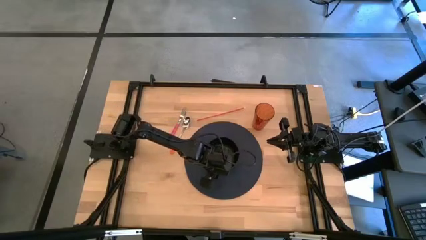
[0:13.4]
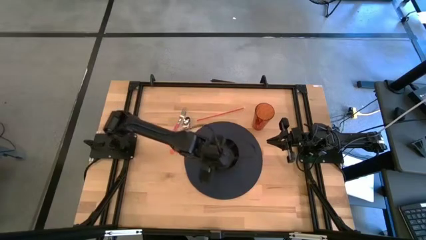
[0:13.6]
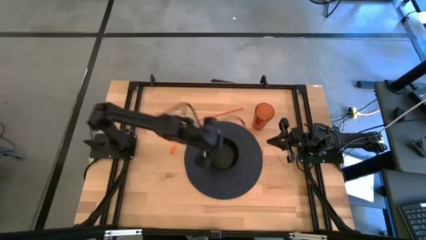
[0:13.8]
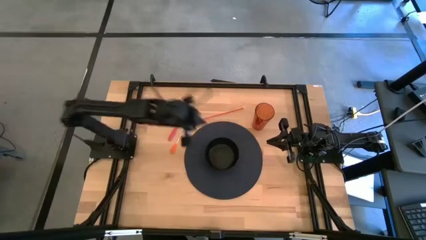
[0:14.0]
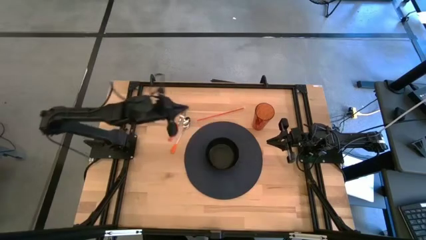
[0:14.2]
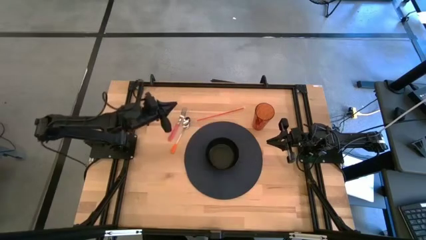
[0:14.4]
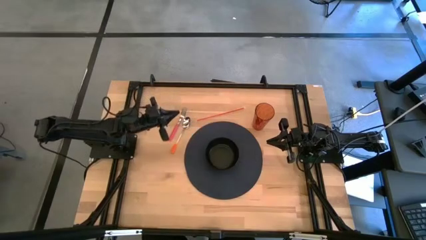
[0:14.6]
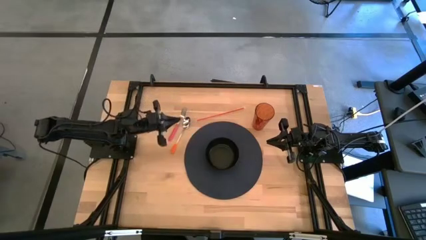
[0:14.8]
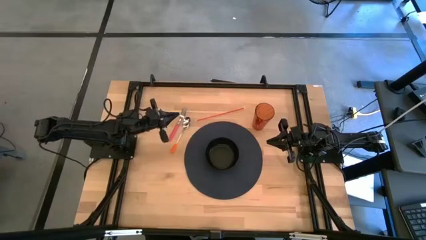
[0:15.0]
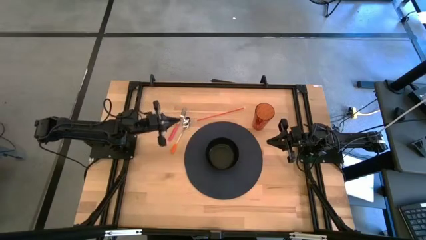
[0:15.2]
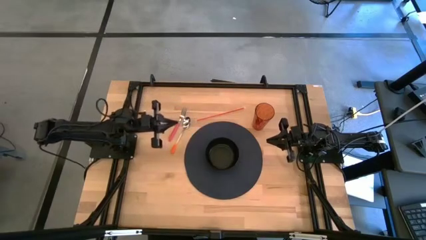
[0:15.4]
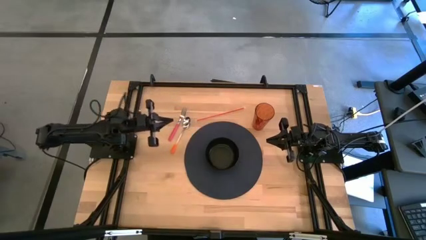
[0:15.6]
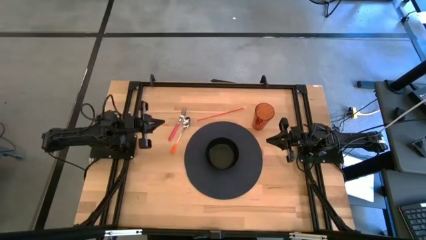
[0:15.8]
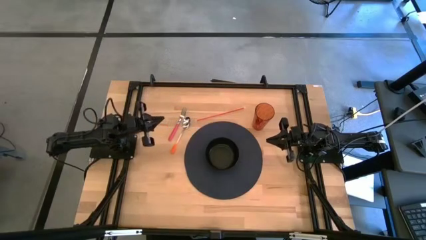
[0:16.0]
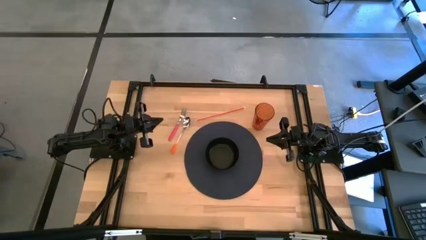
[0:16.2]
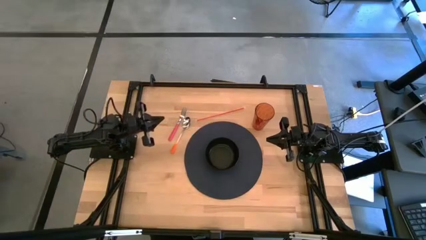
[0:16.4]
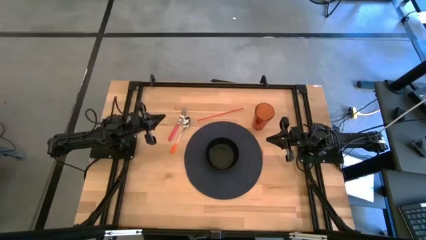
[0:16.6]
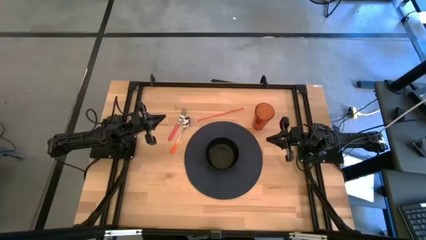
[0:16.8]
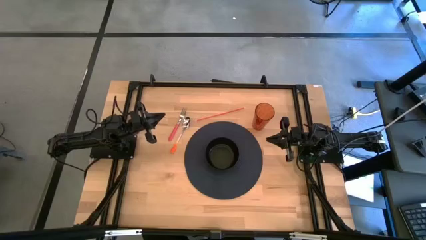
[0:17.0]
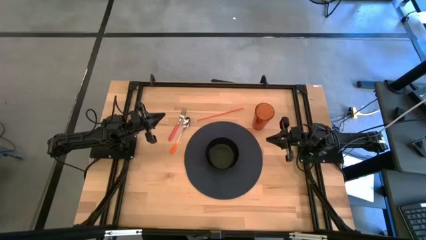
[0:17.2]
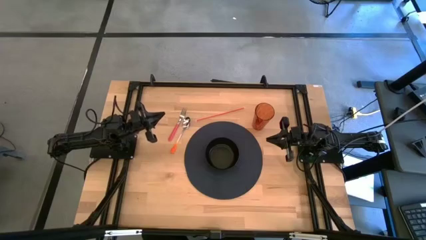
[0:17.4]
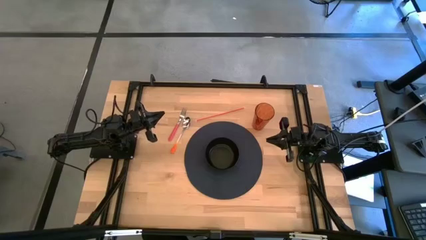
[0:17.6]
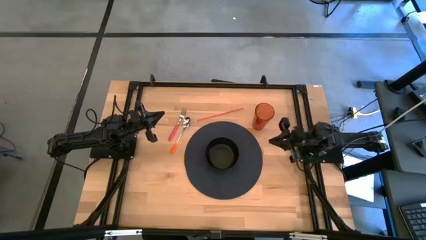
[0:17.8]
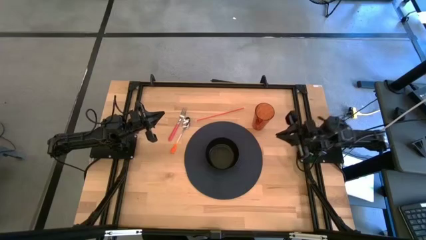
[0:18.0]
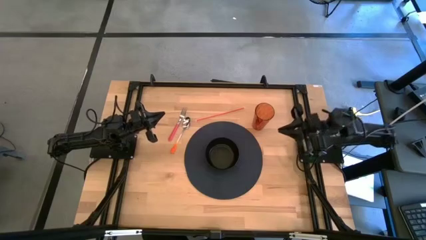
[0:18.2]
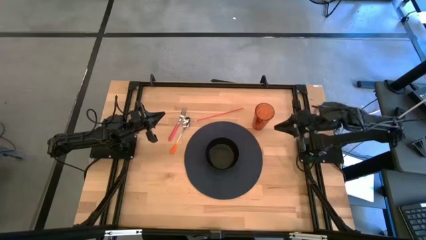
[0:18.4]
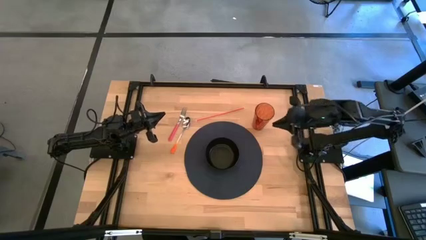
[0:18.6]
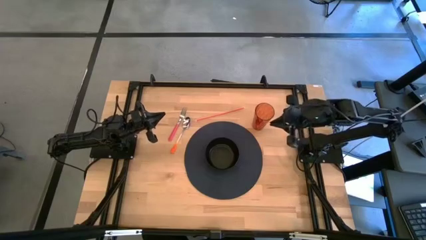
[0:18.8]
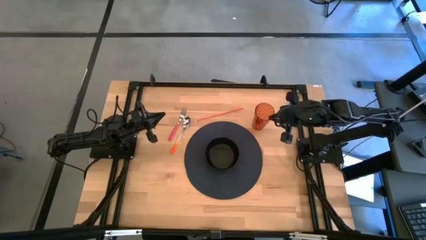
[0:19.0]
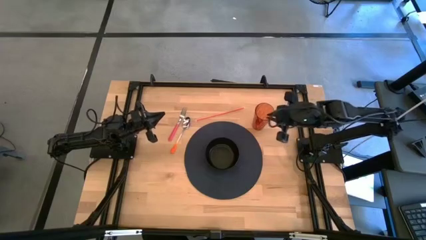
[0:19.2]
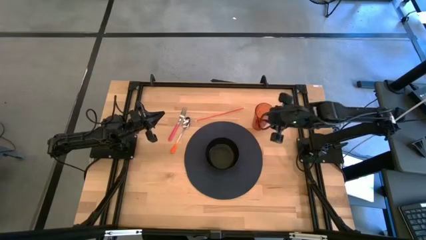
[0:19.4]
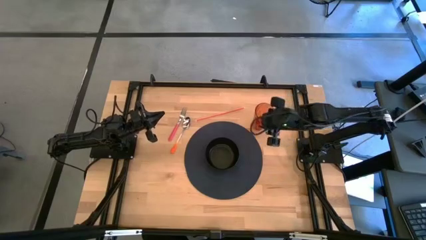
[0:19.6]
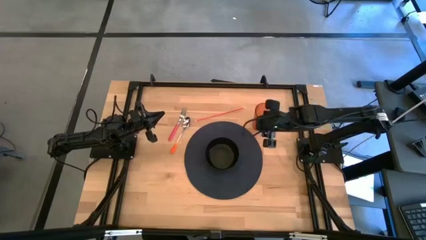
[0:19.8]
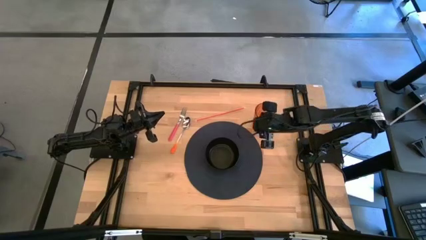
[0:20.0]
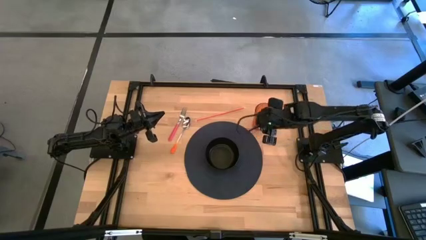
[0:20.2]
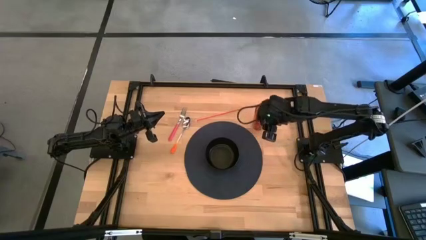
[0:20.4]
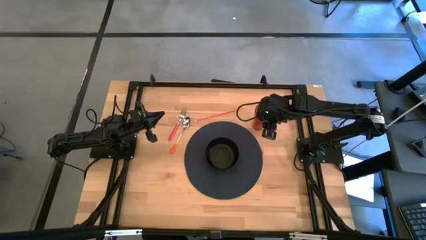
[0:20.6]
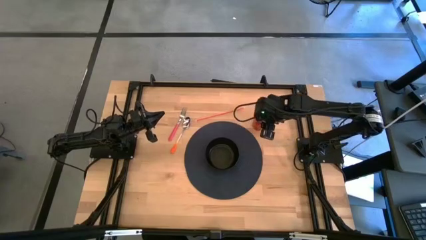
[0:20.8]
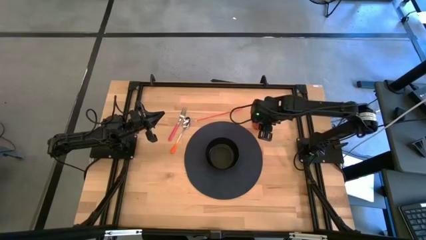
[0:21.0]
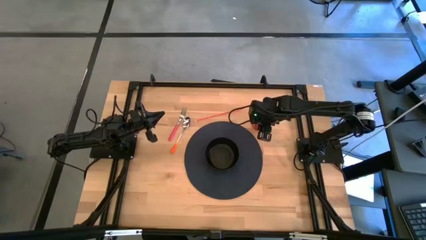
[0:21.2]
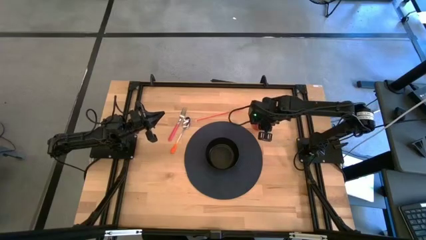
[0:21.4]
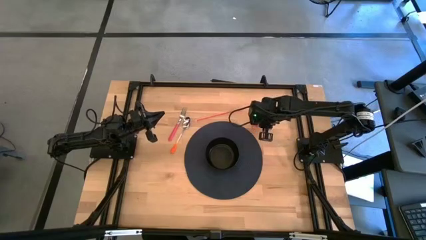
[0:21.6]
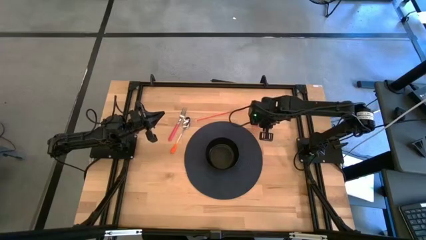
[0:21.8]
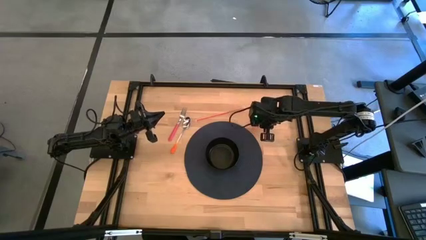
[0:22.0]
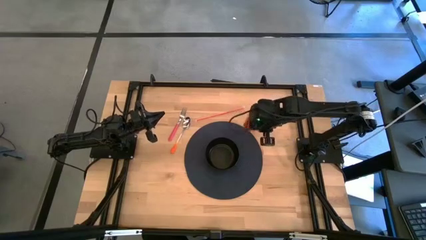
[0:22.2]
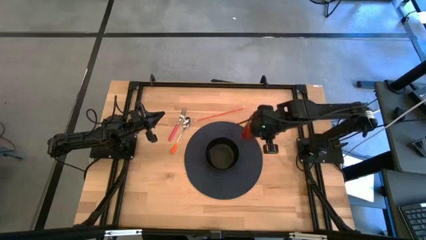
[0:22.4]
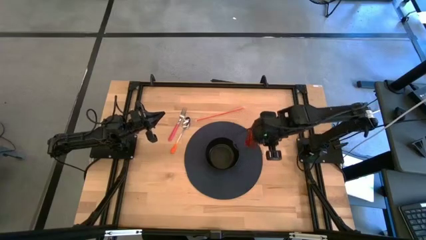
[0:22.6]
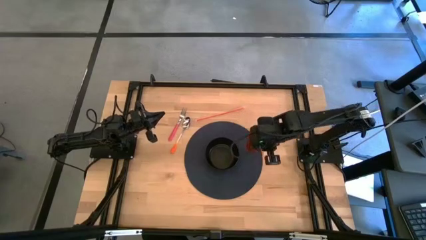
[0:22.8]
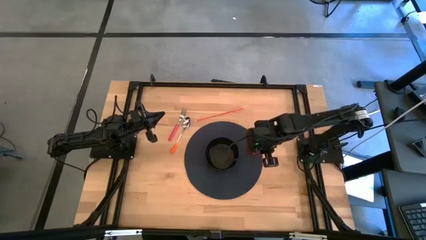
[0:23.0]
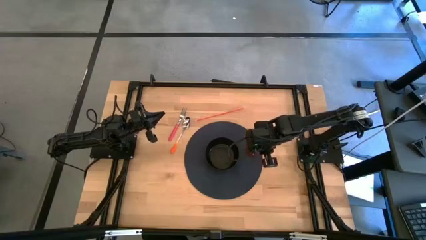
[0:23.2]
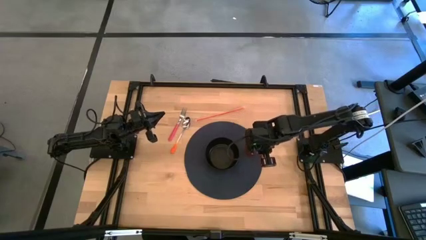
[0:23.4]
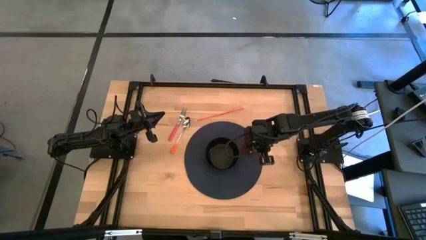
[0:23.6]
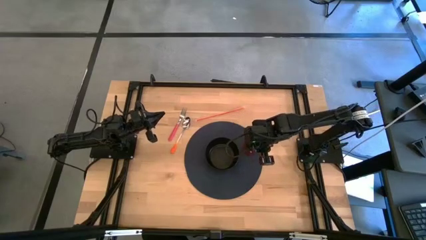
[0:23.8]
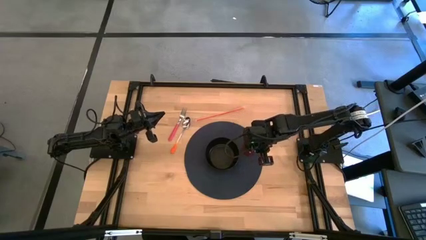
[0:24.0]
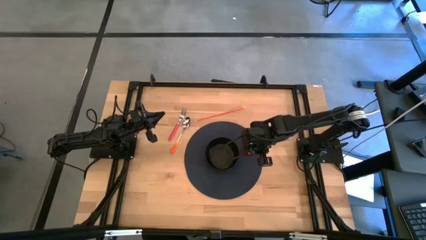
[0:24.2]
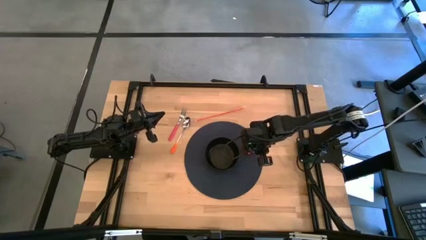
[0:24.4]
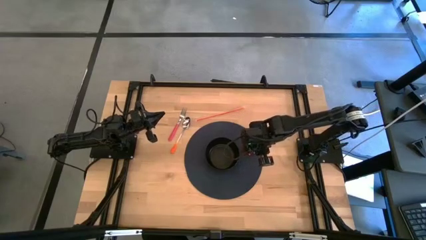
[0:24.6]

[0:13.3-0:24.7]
Task: Pick & Place Utensil
Put the brown cup on the blue placemat to the top right of the black bowl

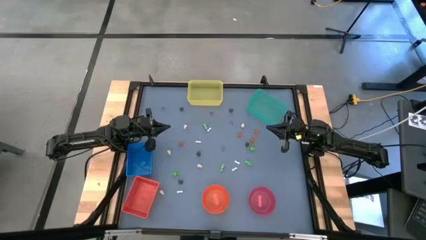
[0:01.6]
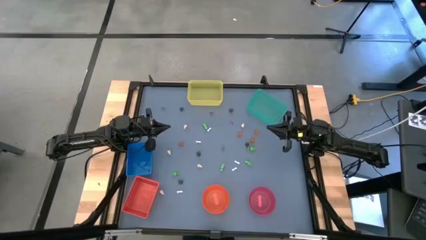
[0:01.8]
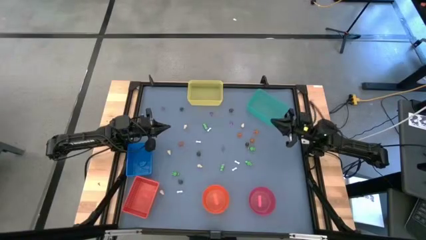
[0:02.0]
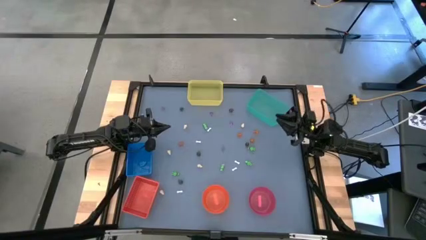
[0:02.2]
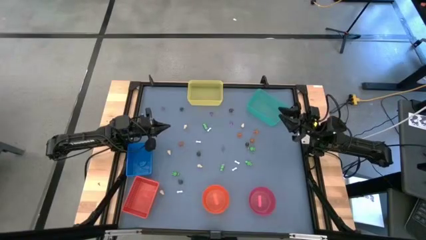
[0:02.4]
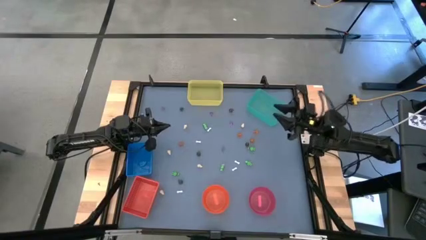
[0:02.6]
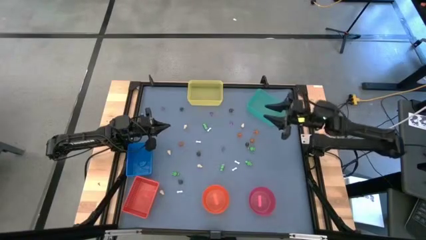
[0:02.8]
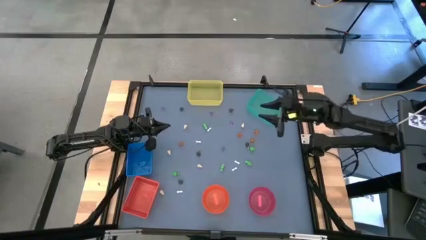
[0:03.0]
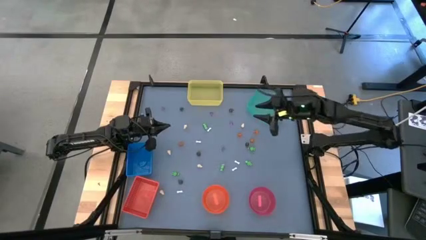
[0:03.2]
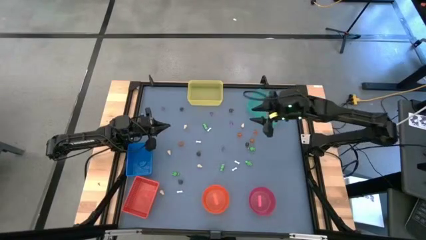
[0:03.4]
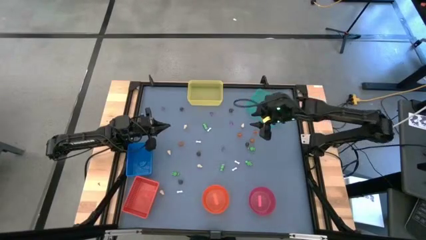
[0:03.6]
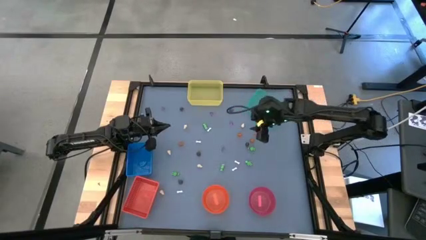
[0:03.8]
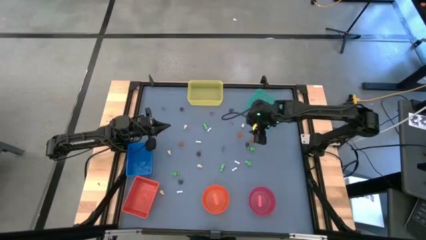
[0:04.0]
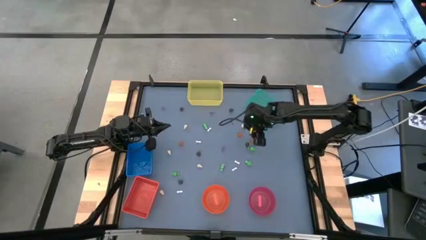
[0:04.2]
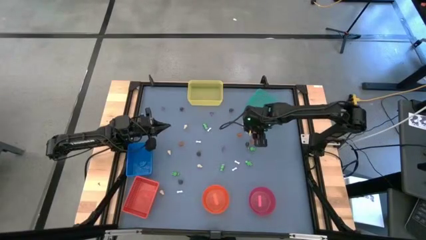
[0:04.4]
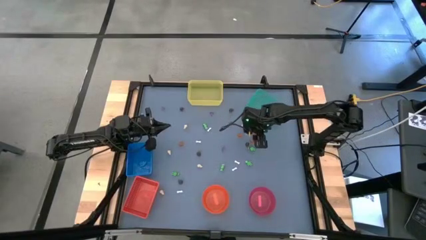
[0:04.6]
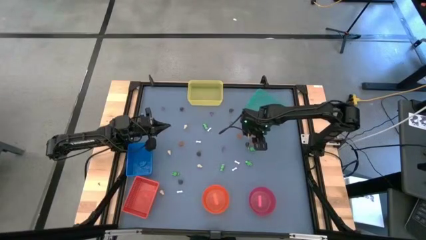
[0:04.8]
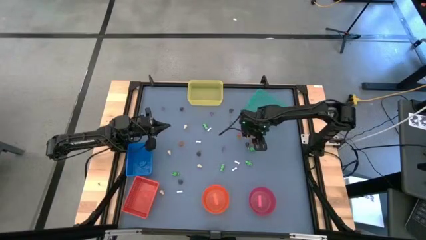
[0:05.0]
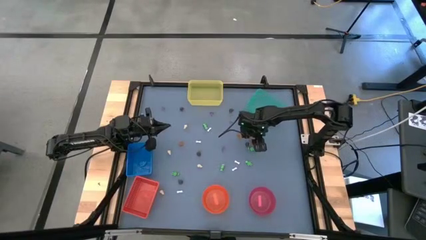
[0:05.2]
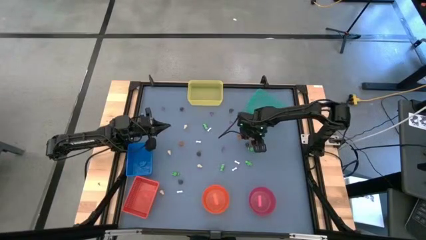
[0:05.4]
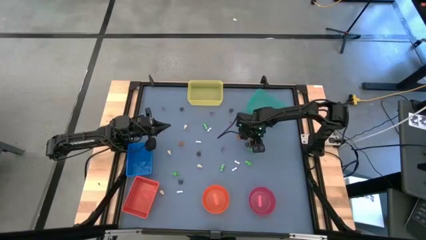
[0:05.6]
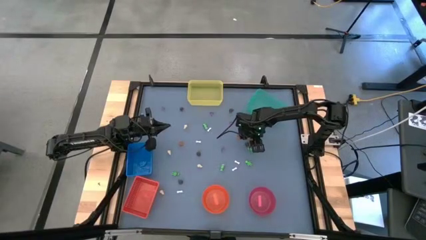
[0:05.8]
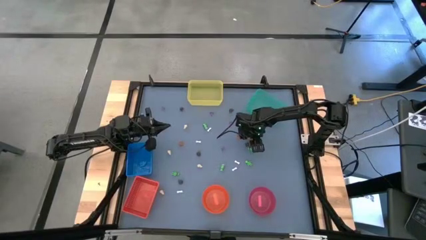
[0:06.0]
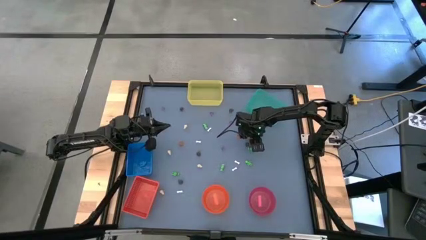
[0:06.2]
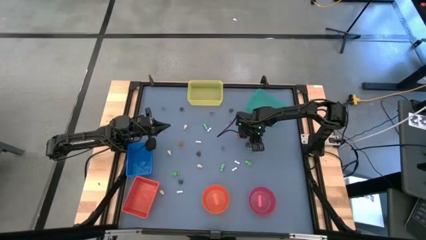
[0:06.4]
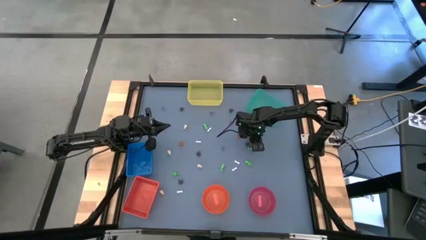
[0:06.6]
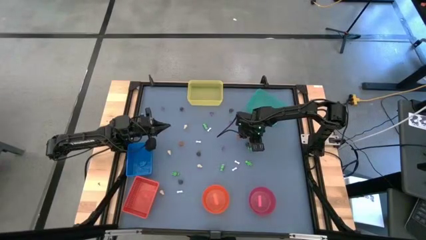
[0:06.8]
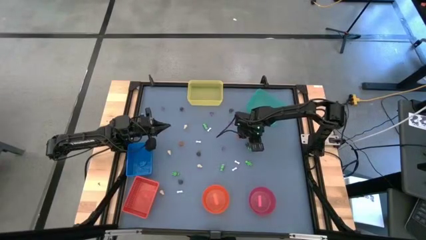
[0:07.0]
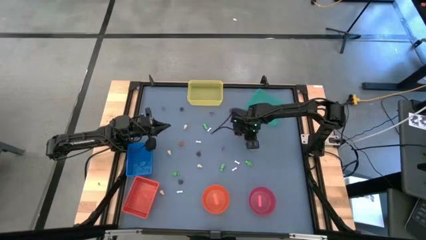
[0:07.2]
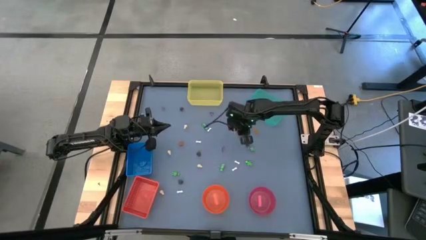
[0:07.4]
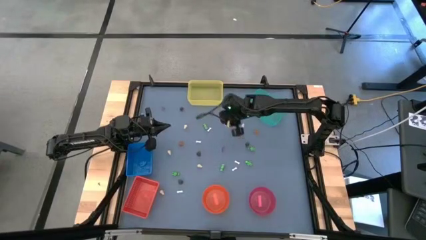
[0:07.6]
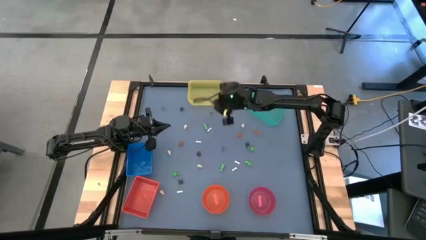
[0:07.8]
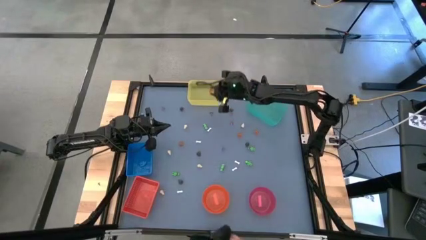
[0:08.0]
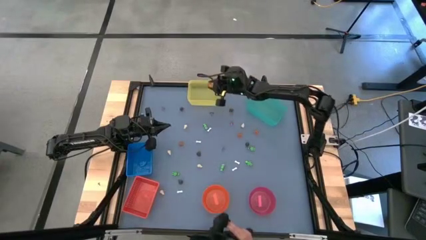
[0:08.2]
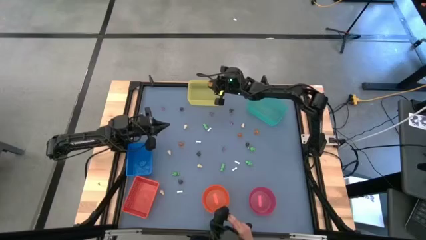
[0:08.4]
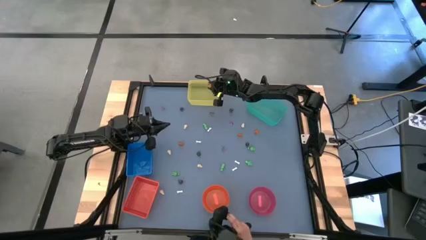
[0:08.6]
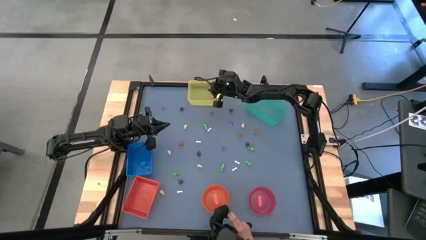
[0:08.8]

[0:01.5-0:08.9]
Task: Sort Halloween decoration
Put the orange pumpkin toy into the yellow bin
